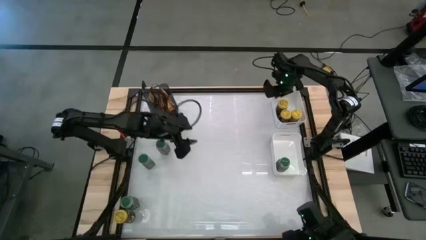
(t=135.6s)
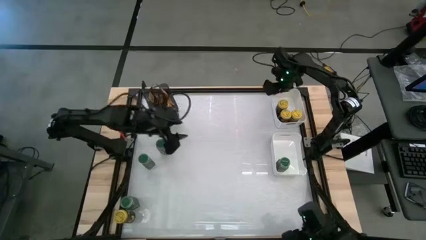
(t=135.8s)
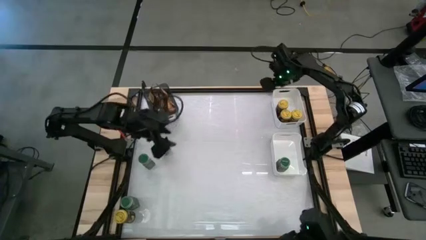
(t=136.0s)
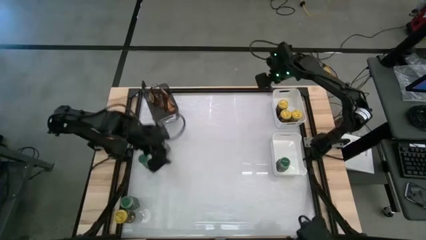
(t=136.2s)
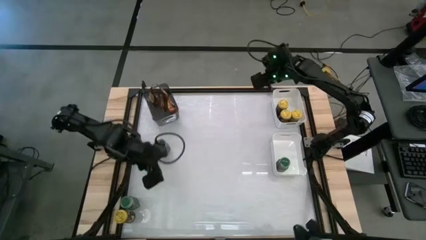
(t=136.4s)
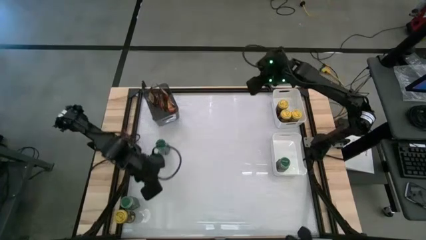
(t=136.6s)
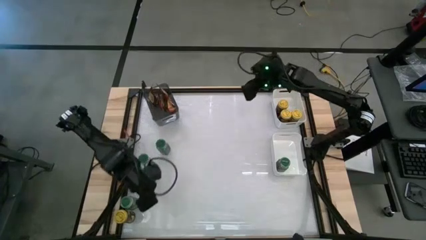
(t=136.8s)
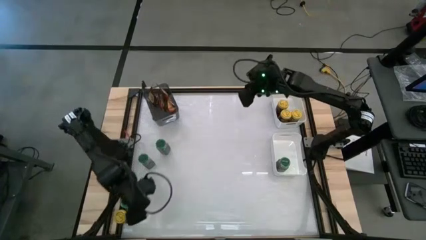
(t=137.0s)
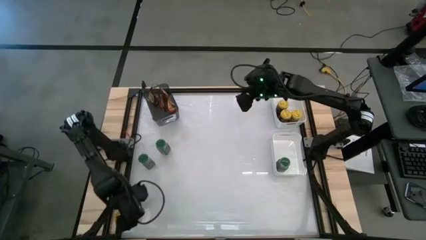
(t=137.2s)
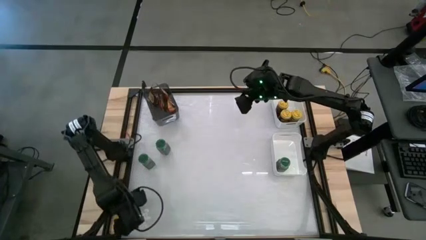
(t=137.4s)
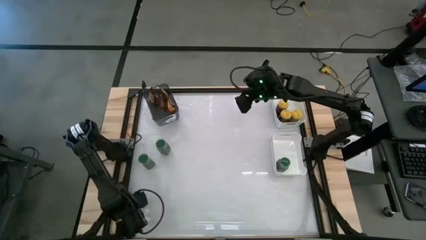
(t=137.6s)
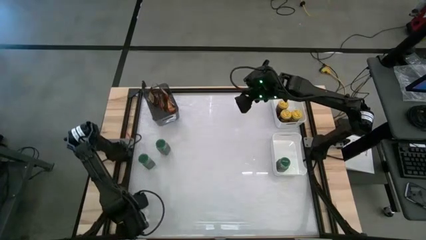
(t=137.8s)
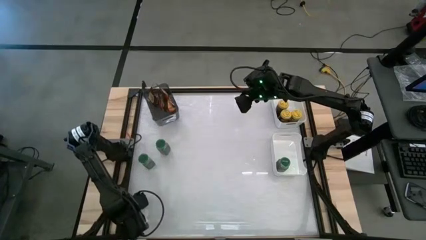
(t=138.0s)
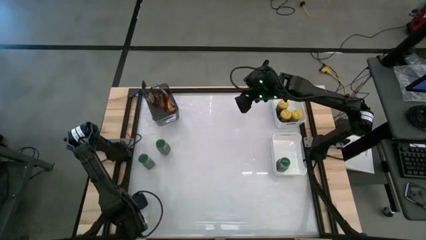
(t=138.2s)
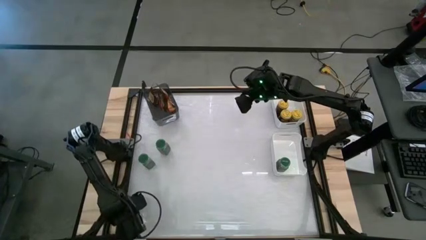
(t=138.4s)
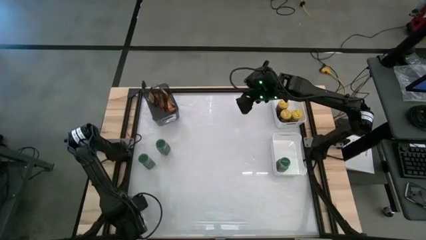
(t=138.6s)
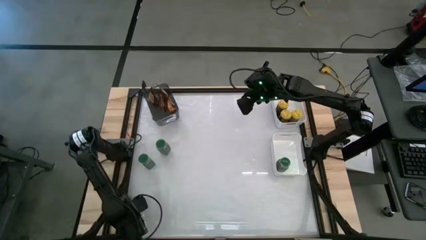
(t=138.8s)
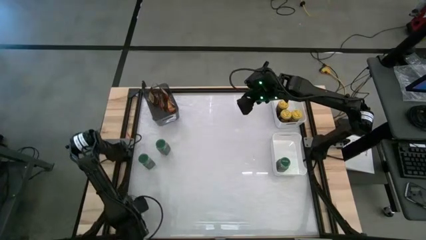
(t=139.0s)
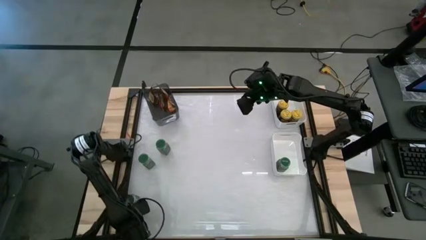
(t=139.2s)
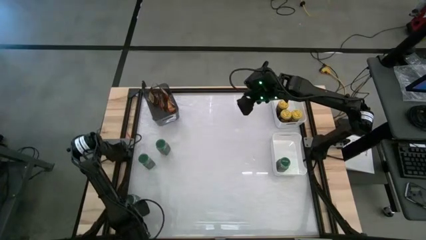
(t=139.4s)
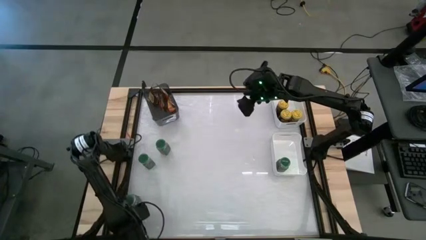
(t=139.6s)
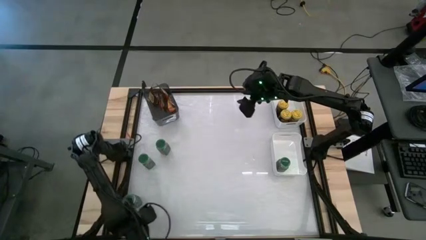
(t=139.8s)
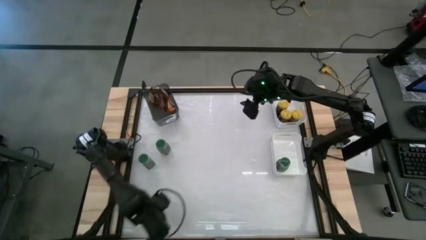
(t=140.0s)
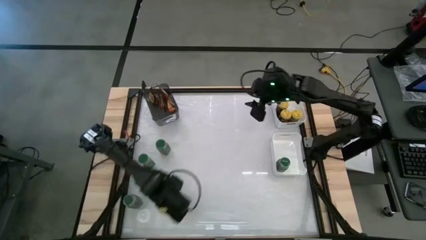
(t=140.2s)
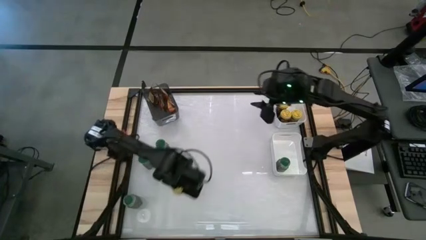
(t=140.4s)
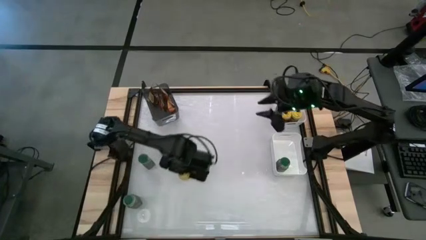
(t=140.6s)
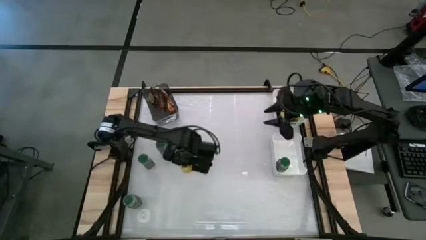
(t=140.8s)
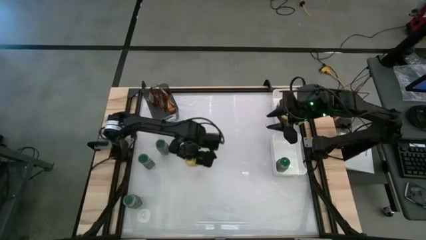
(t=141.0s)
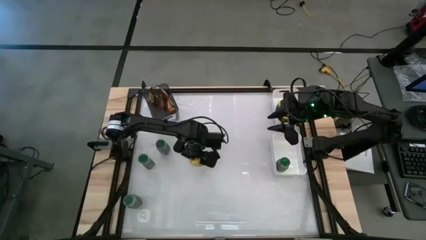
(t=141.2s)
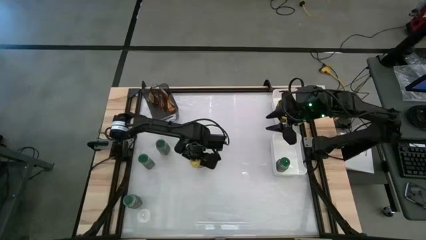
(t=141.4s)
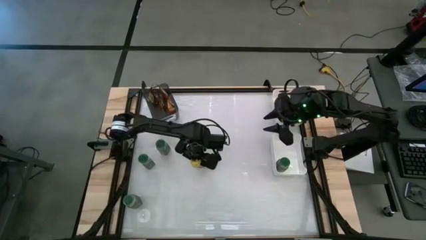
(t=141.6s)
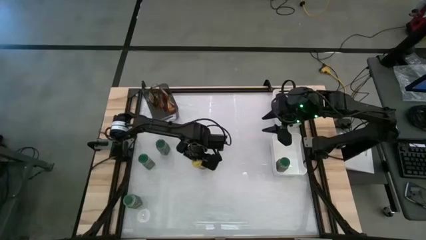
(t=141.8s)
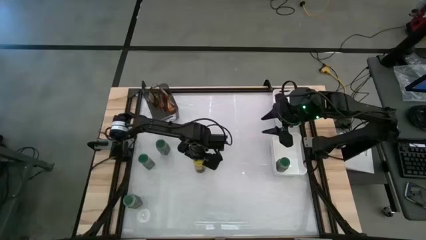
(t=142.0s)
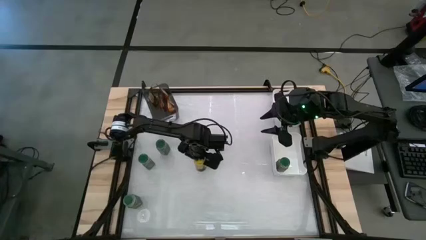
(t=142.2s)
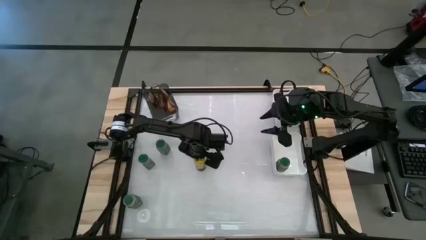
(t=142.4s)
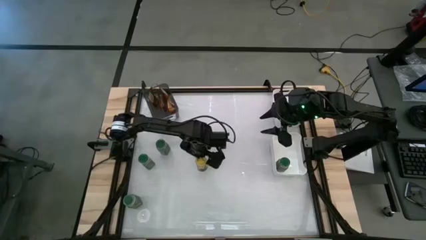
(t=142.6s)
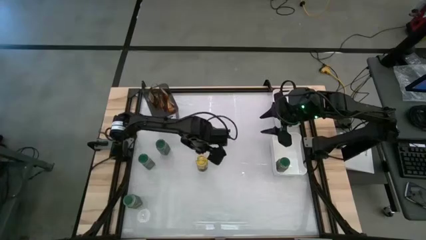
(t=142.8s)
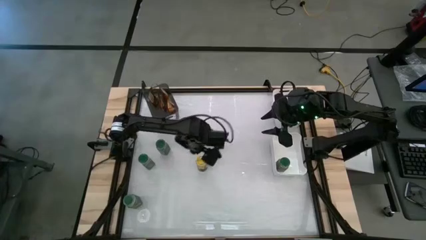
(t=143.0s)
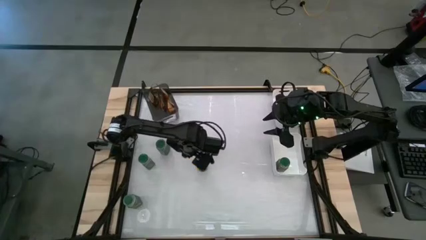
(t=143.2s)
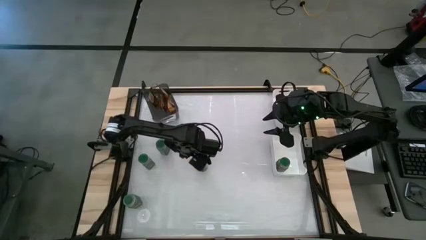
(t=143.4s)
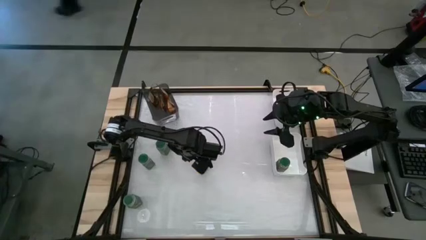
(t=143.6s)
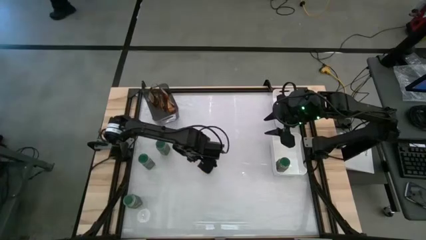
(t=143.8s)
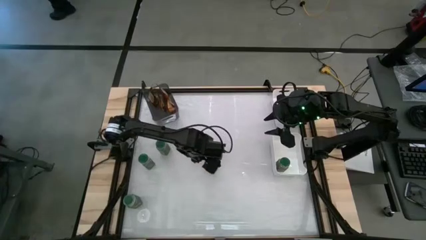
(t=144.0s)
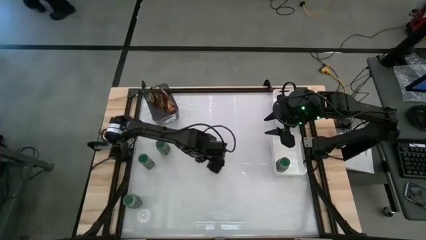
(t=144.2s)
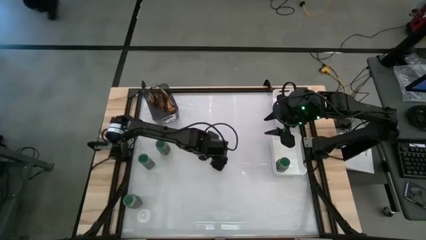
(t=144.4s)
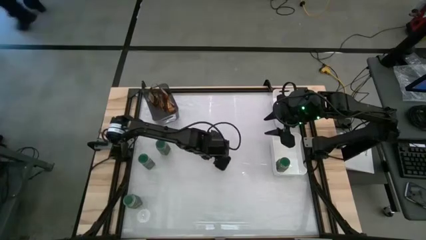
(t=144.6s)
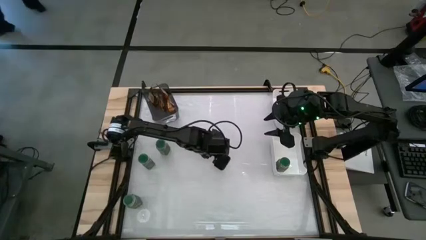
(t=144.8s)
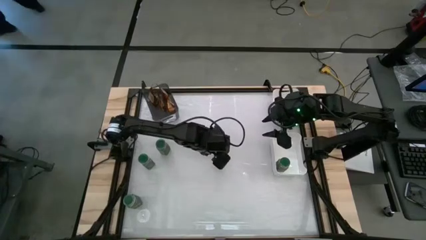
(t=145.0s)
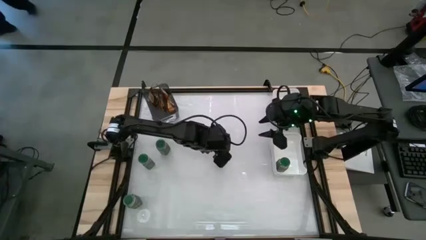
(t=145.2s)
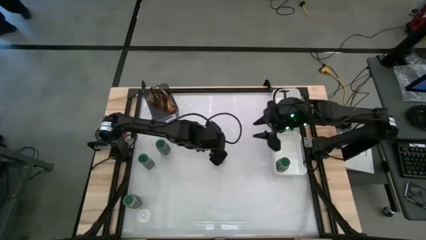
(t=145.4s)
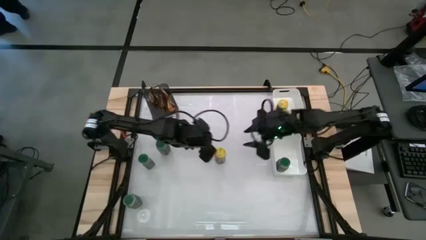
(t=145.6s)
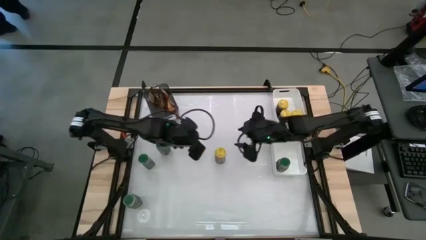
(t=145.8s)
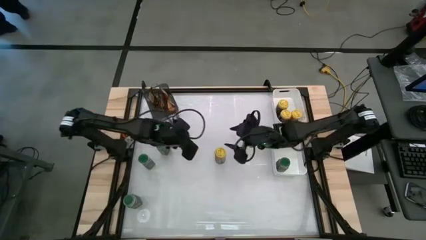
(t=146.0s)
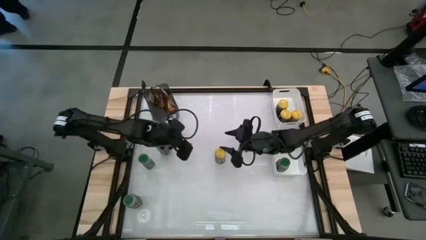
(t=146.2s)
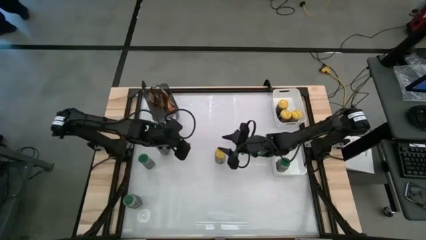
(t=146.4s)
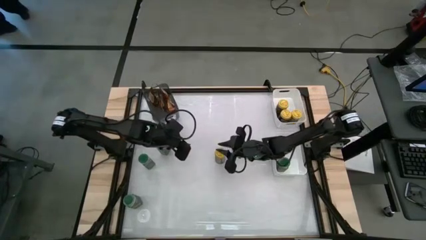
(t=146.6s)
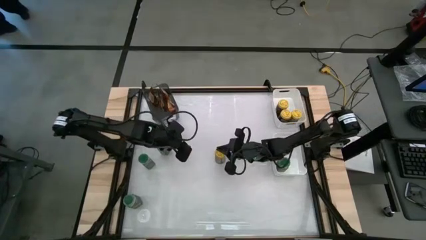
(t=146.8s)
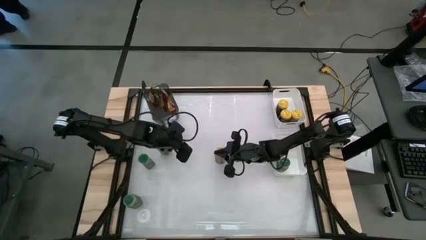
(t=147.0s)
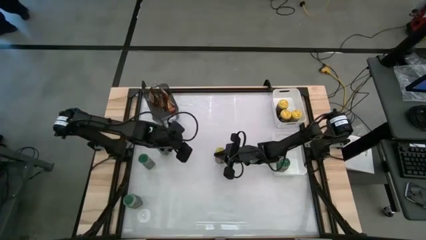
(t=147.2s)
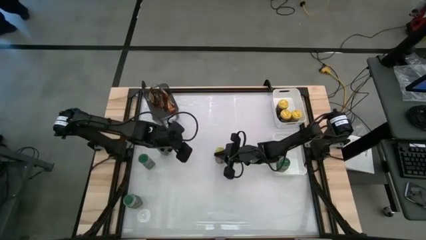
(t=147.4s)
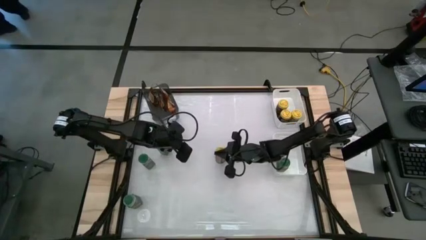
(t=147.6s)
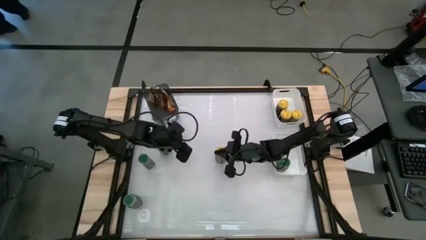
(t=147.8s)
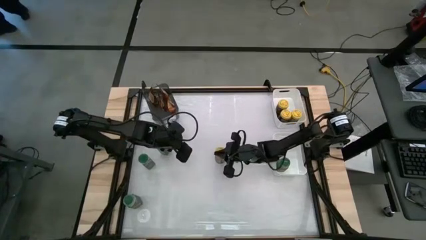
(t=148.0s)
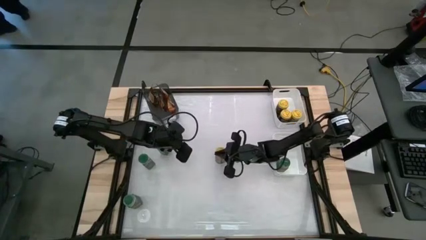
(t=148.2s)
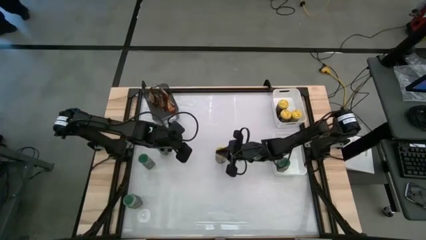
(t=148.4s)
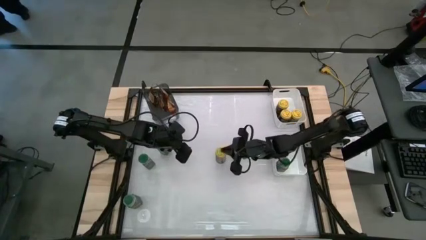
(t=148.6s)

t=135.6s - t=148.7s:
Task: Sort spices by type
Put the yellow seasoning bottle into the top white bin

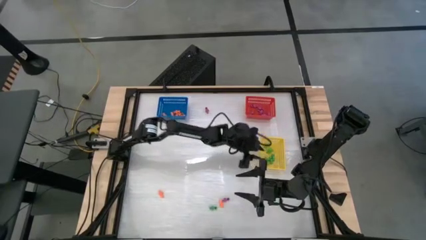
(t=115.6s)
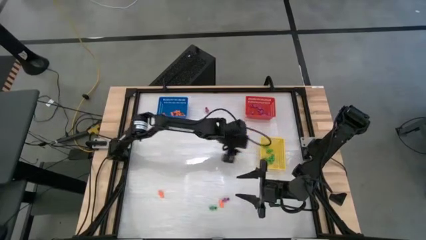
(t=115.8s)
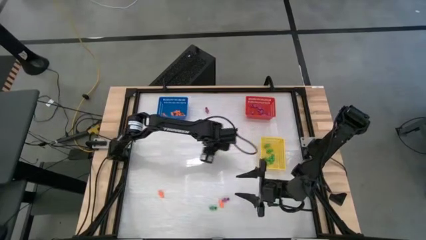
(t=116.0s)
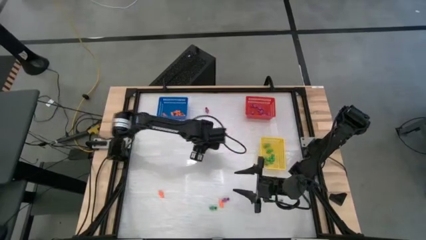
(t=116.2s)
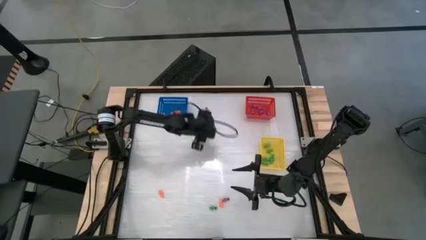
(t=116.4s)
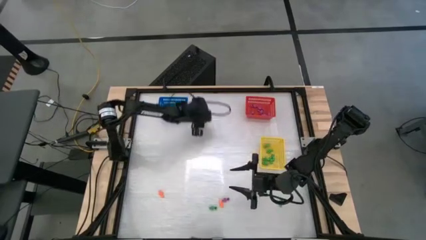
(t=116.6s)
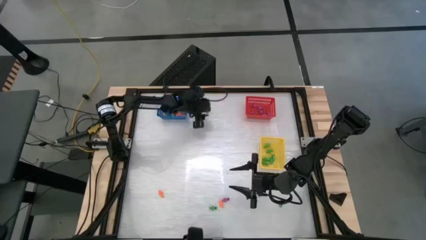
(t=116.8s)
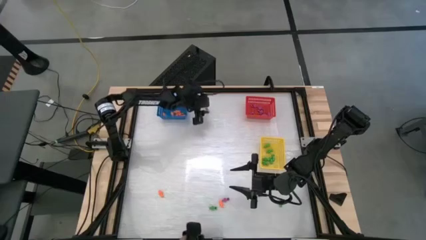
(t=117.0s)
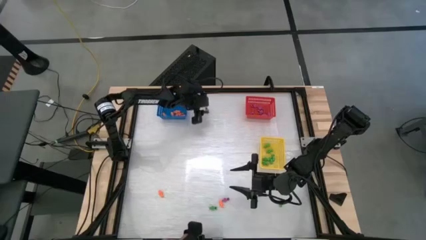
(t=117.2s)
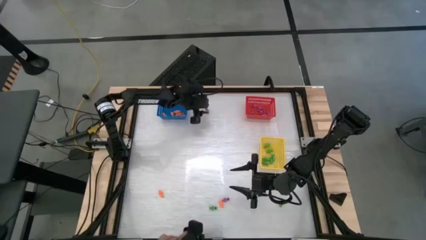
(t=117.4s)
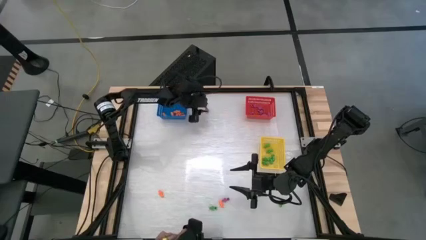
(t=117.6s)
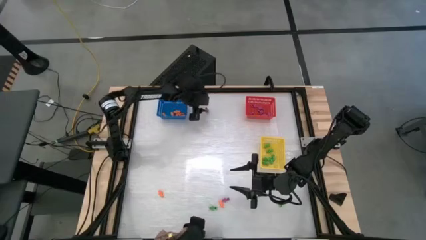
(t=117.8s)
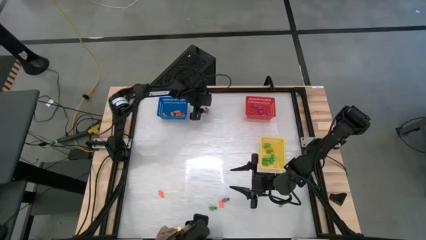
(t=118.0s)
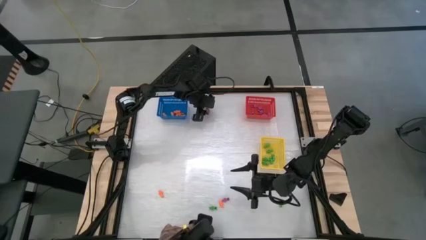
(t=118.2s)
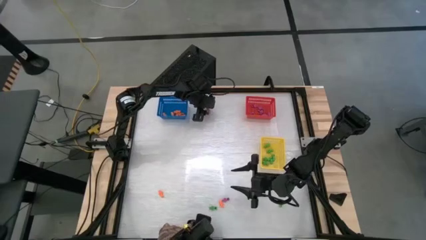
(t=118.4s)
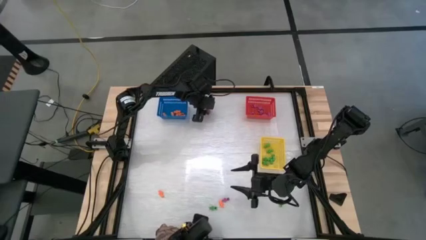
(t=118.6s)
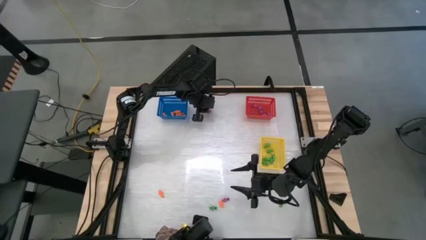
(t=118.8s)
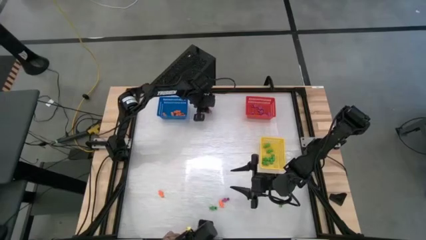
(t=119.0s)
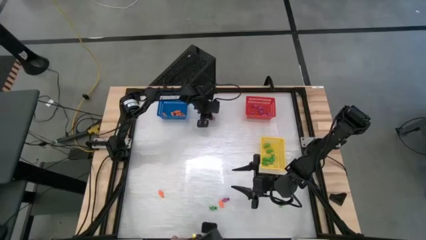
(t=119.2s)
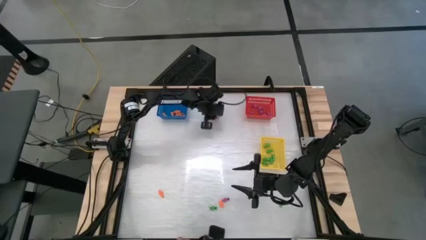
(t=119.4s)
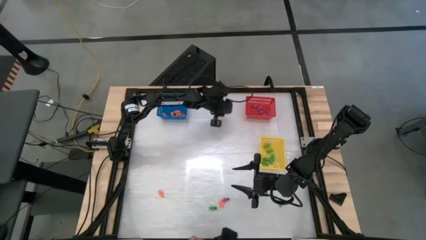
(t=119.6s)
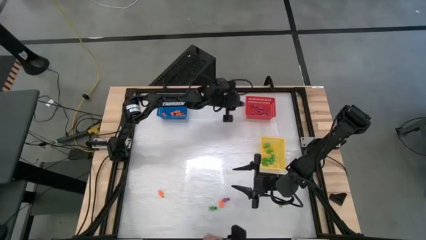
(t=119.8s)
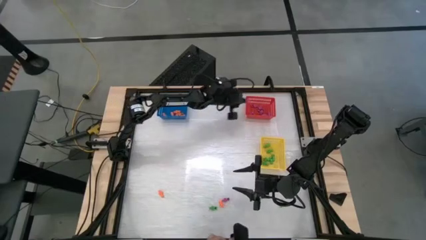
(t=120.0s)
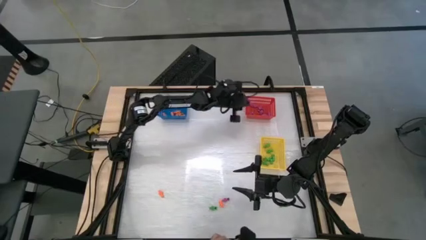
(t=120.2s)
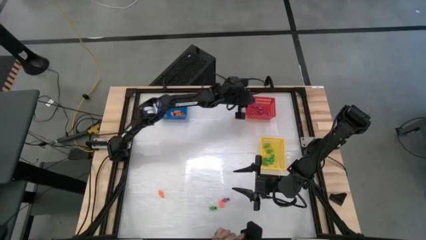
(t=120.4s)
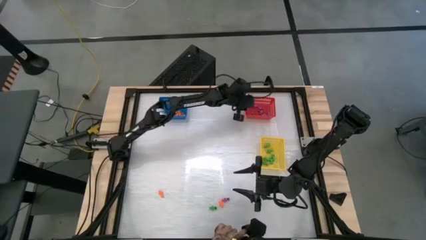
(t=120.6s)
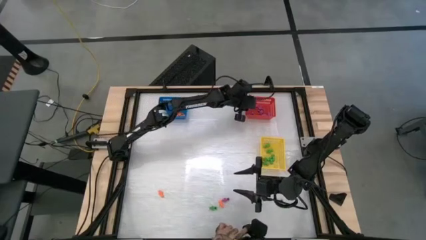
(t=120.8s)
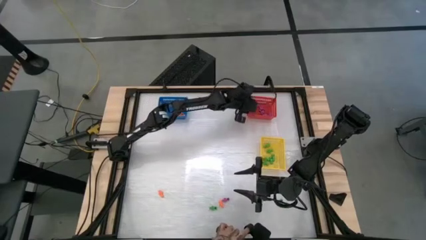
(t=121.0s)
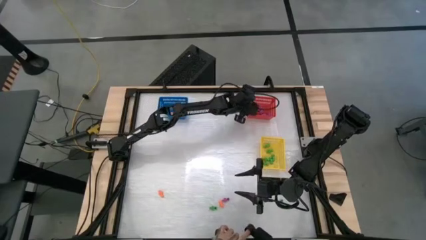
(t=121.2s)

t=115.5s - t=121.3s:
Task: Sort Halloween decoration
Put the purple skeleton toy into the red bin
